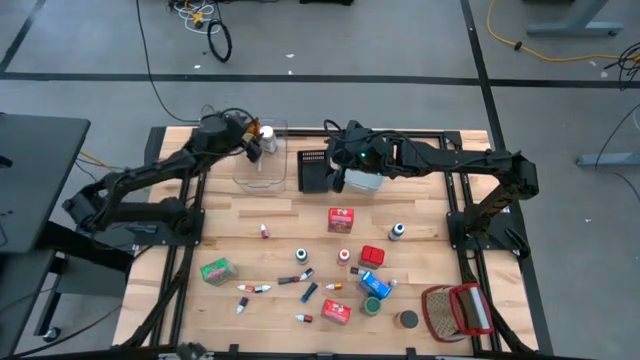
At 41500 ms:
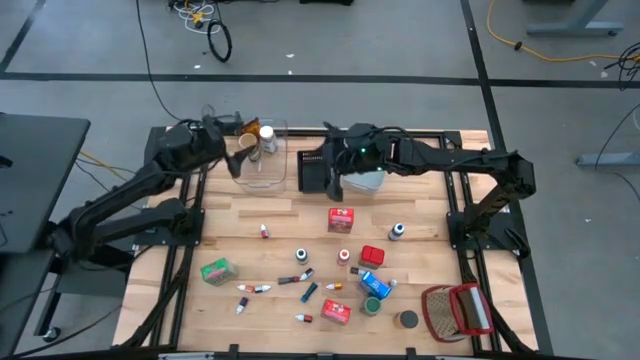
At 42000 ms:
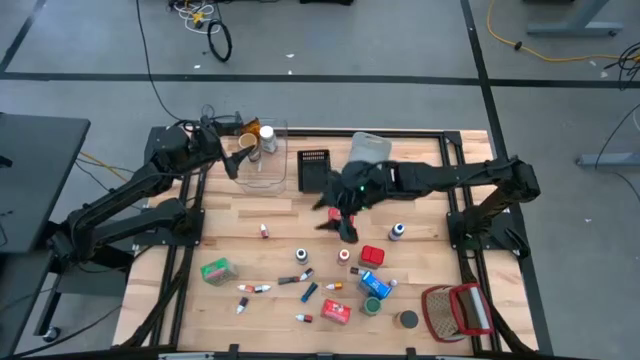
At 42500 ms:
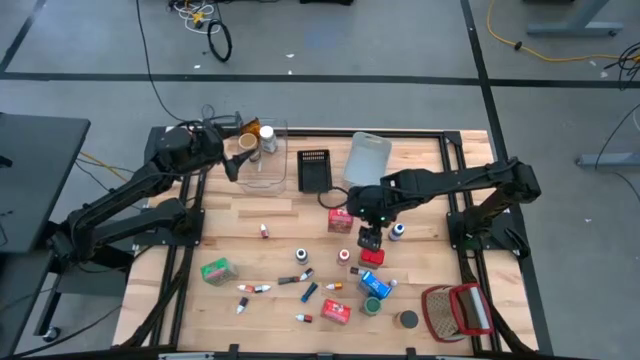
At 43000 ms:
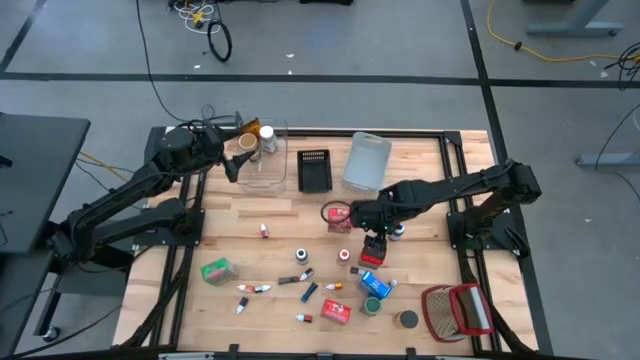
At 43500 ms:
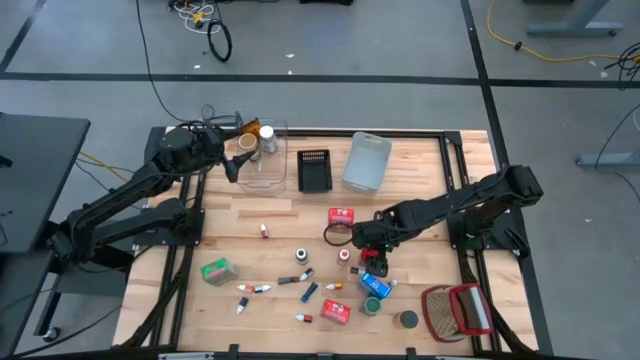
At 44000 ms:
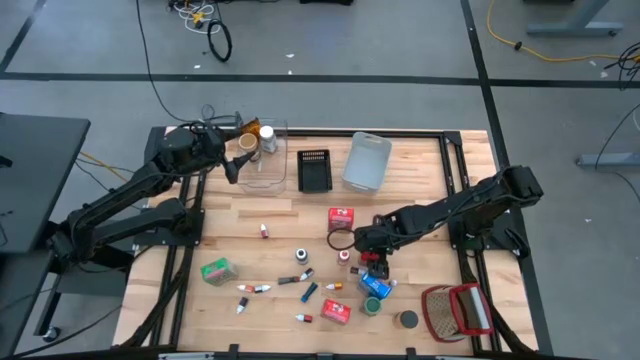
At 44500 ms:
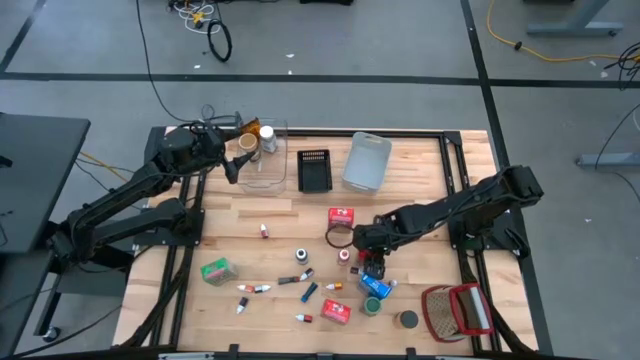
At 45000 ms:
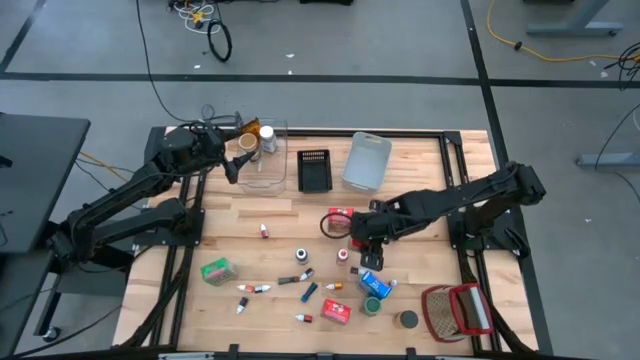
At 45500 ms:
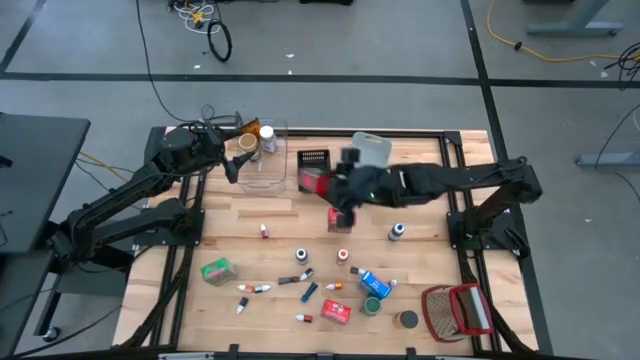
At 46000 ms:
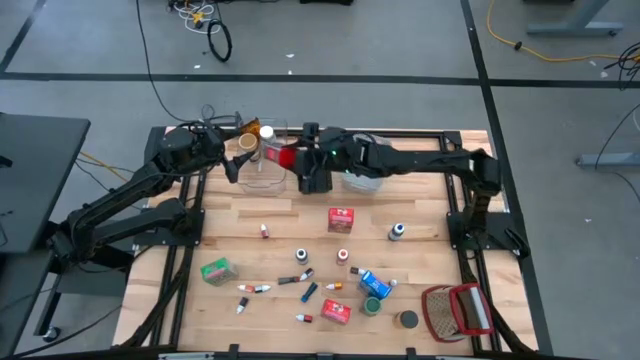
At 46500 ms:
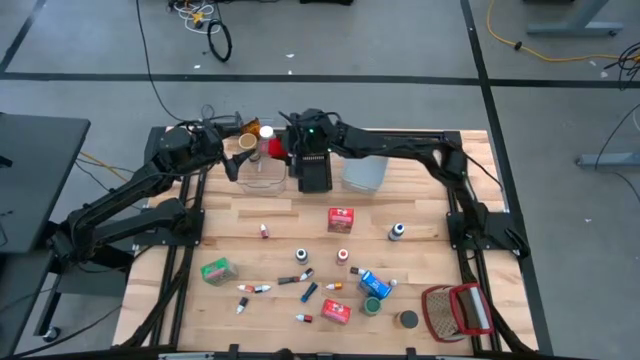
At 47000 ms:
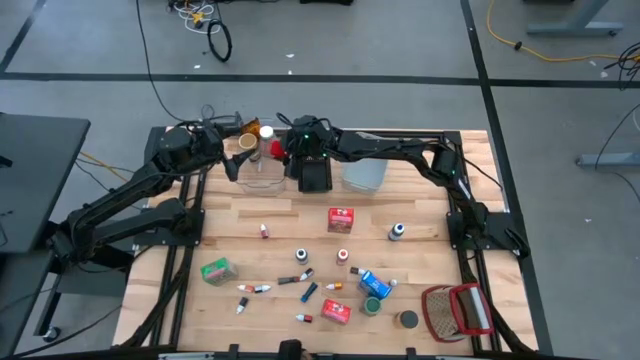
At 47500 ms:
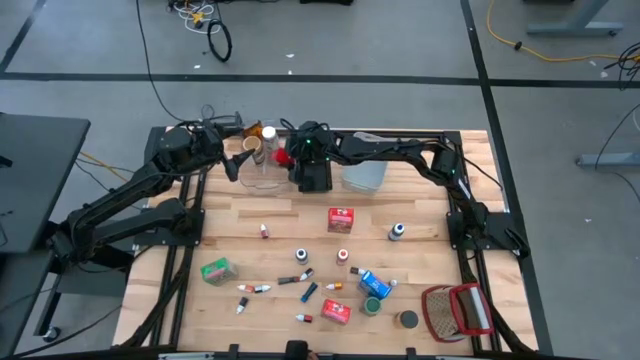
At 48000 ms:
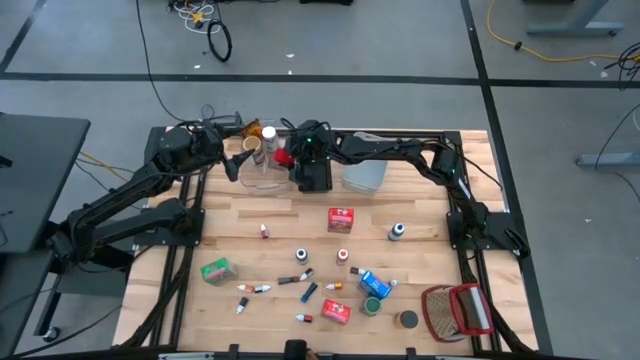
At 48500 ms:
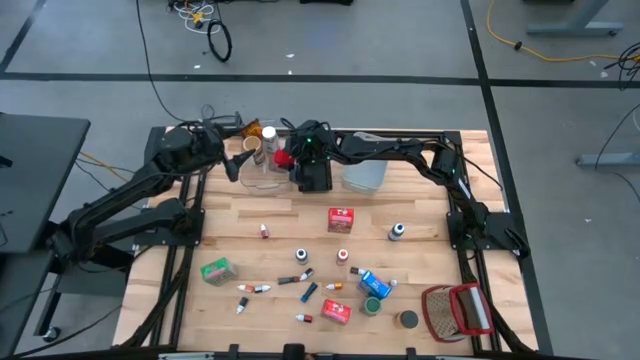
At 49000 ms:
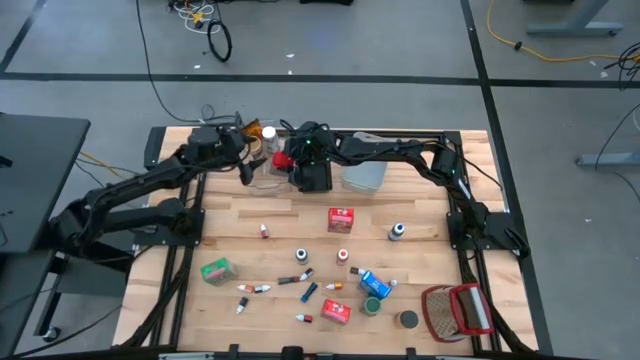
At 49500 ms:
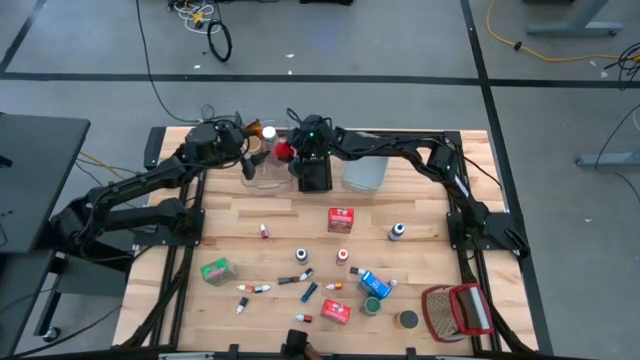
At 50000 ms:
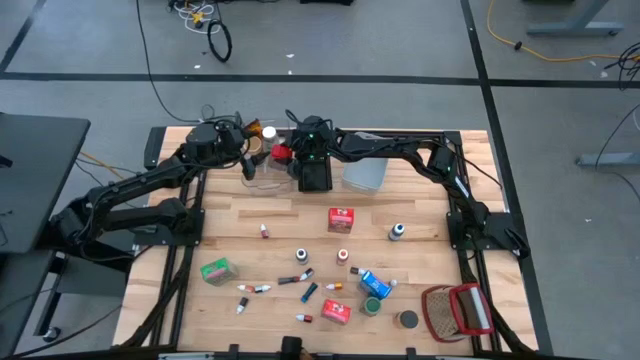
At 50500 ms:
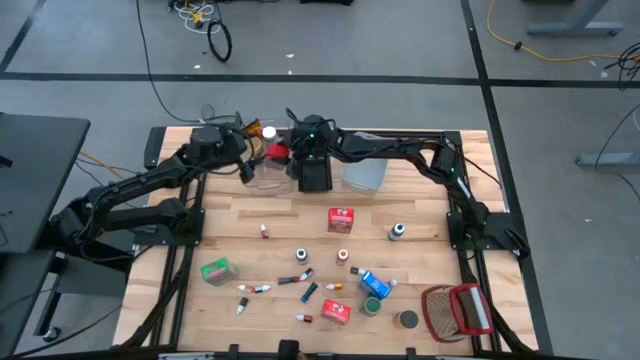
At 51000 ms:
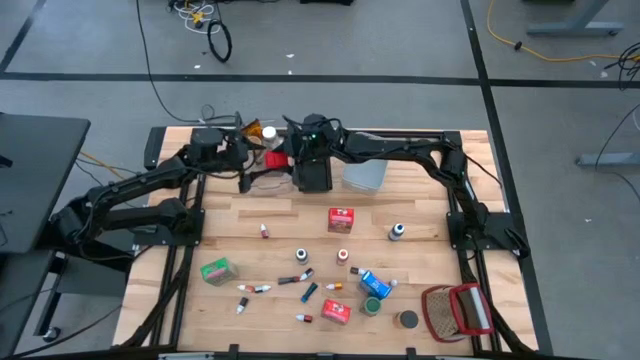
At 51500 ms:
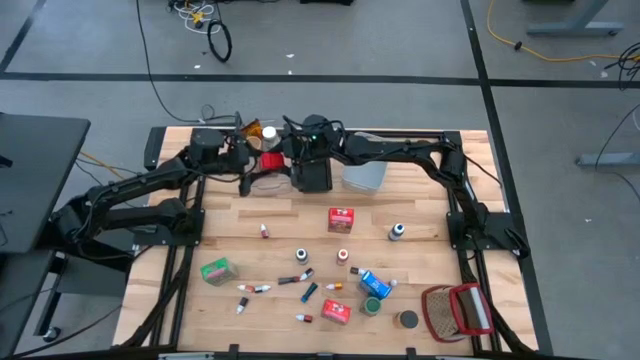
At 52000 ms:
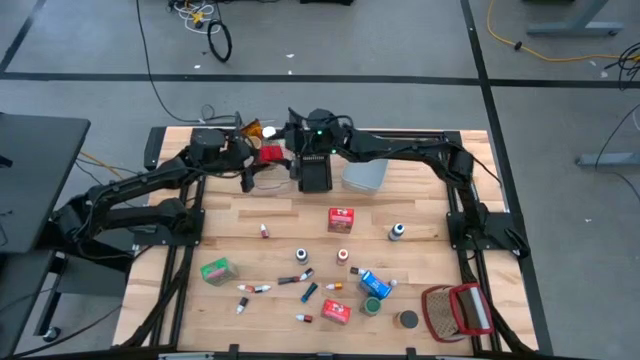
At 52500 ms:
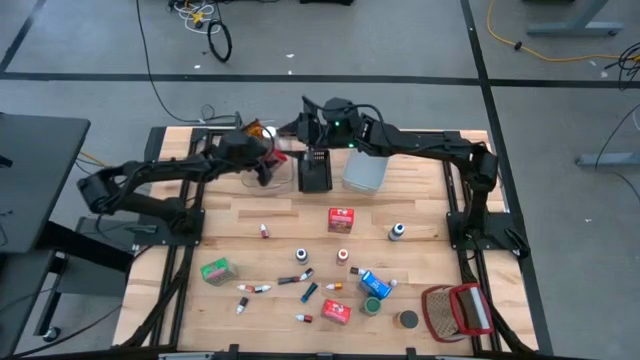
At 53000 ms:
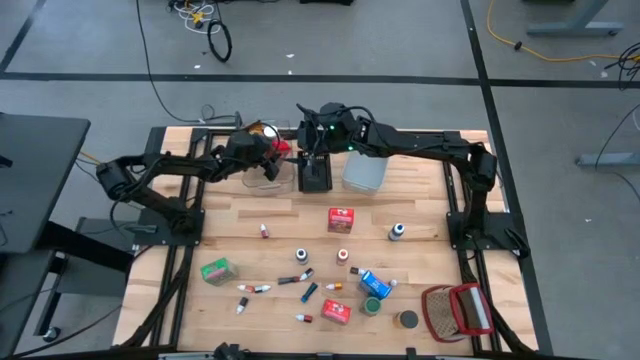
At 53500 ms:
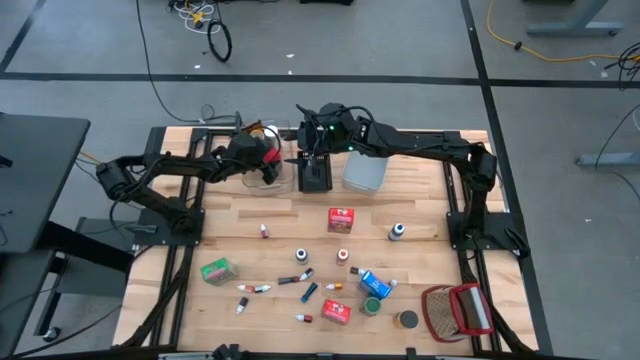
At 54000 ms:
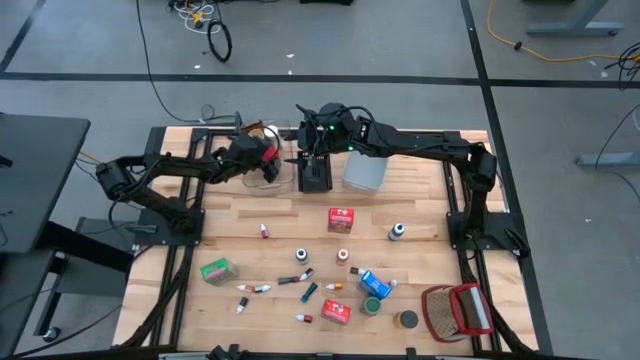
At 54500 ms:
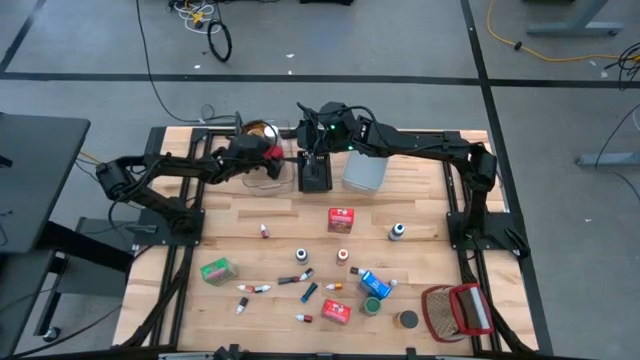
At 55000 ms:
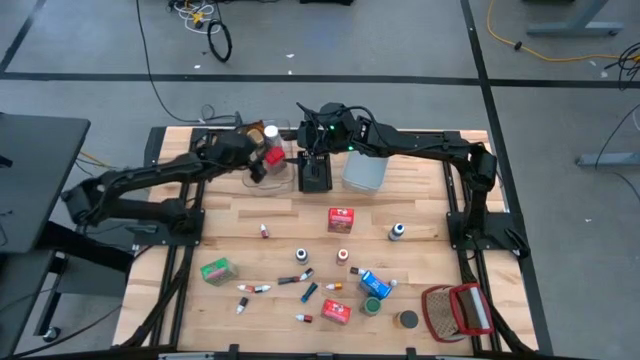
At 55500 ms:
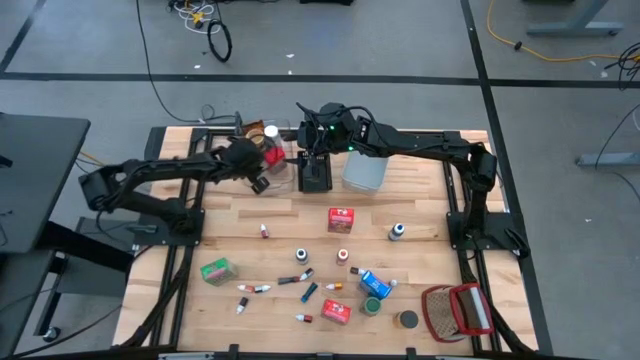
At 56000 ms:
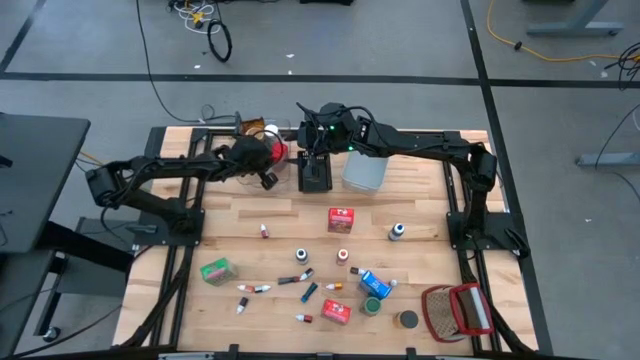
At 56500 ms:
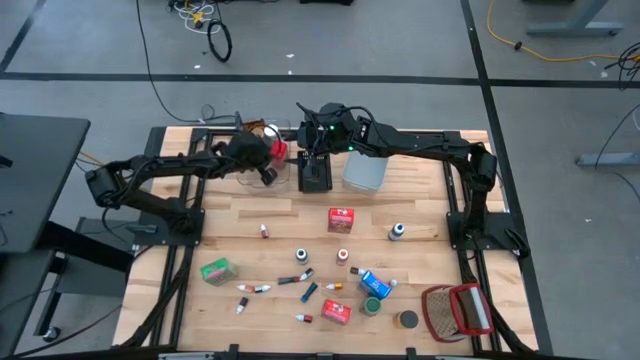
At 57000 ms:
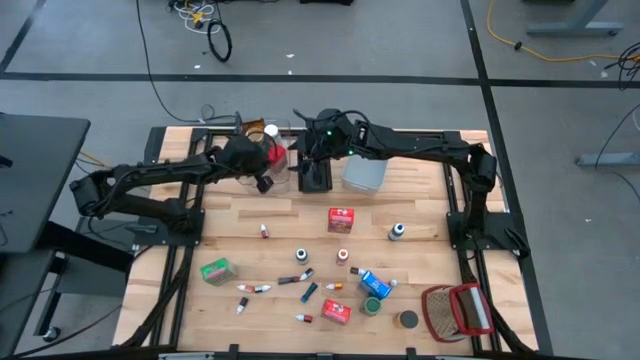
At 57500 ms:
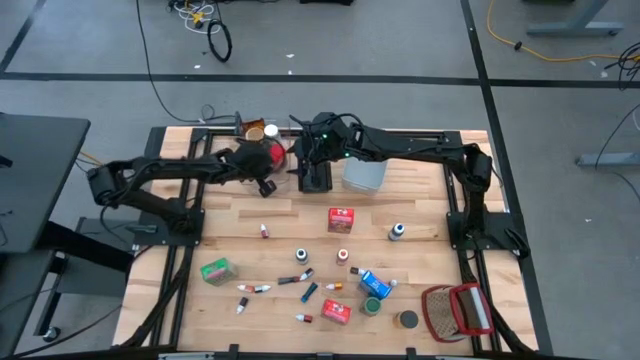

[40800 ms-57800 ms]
Task: Pick & Place Kitchen Items
Put the red seasoning can into the transparent bin

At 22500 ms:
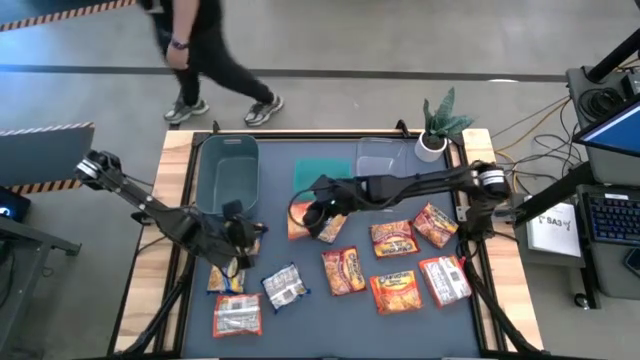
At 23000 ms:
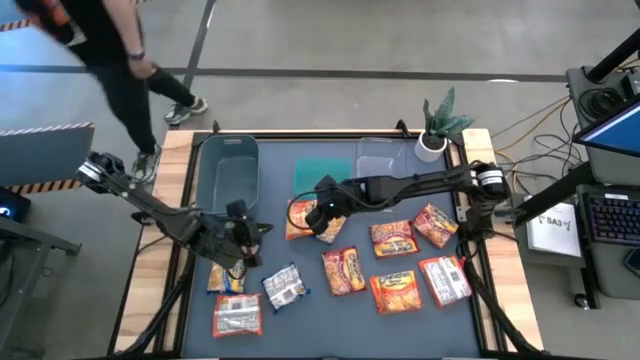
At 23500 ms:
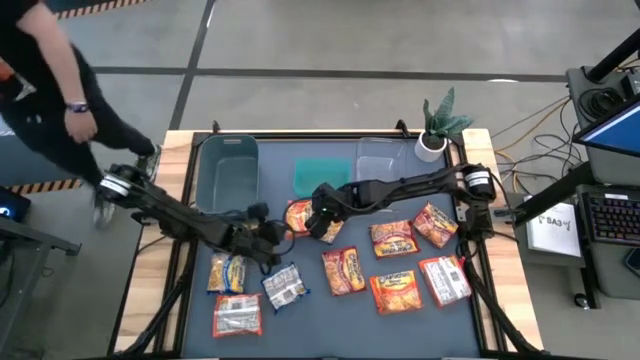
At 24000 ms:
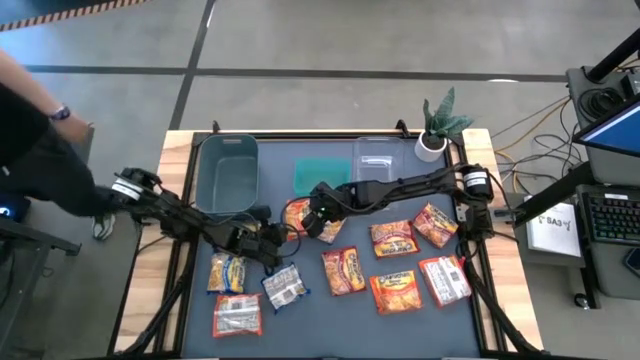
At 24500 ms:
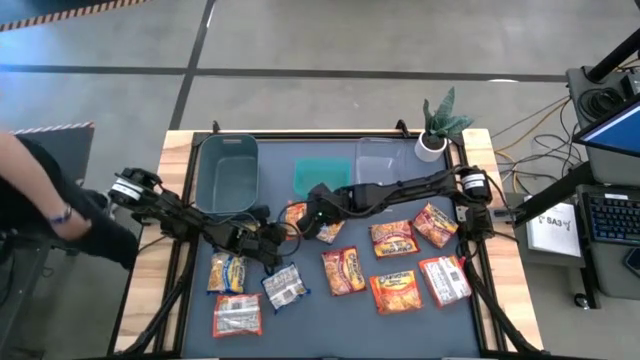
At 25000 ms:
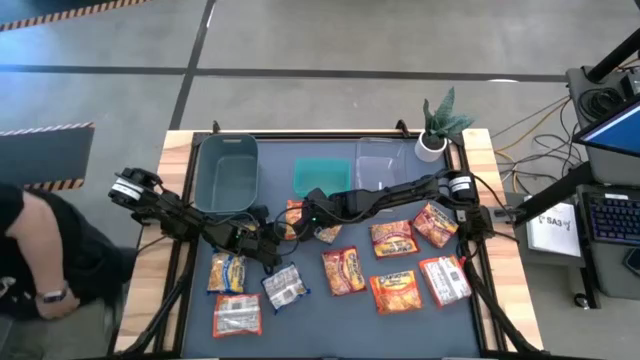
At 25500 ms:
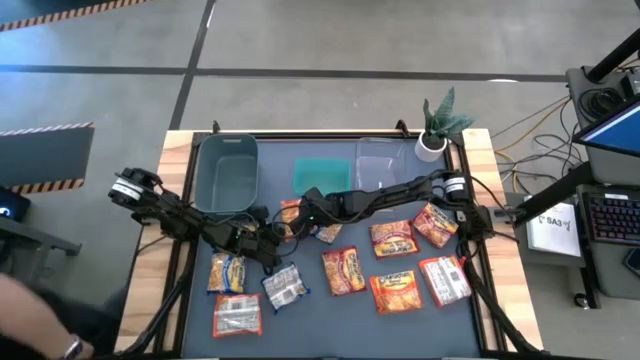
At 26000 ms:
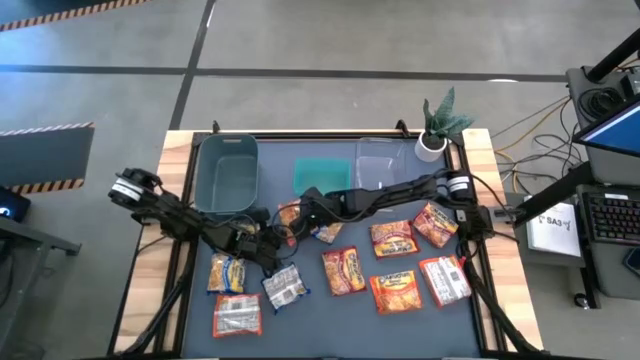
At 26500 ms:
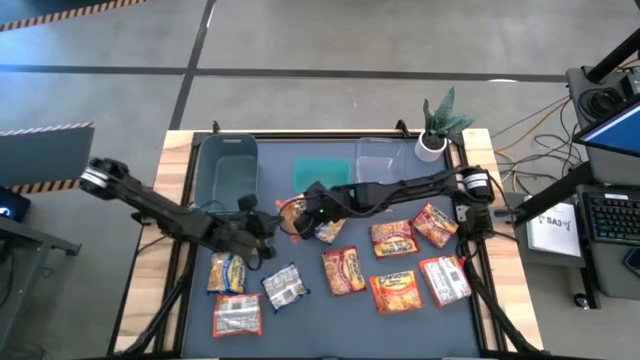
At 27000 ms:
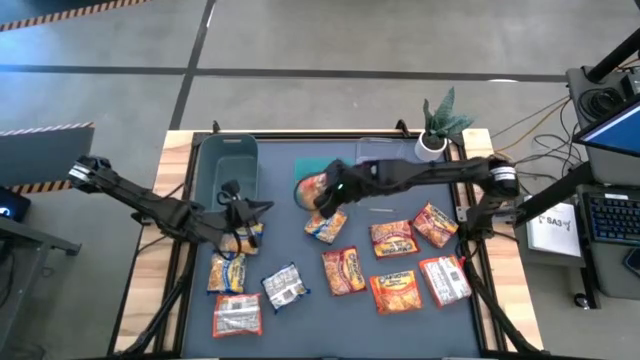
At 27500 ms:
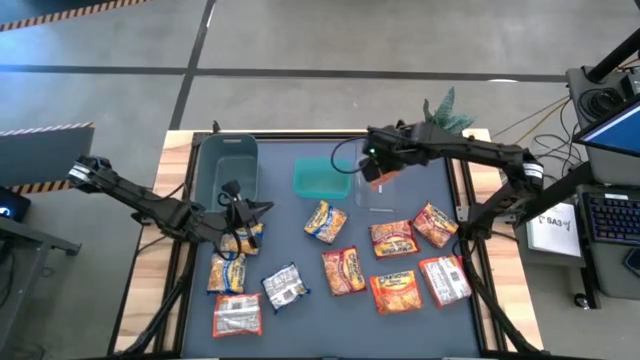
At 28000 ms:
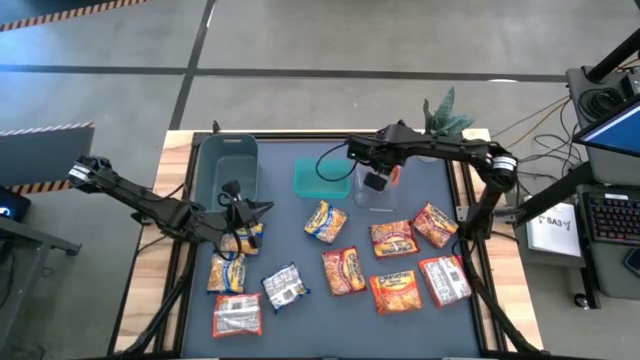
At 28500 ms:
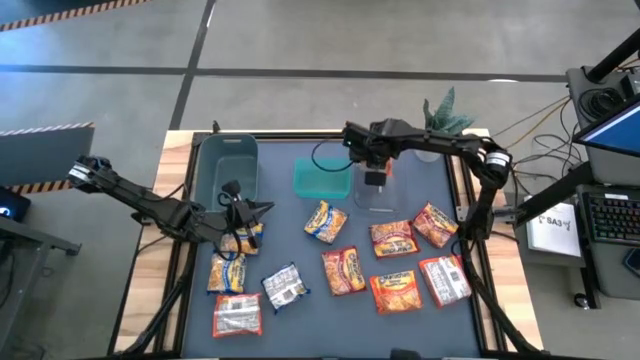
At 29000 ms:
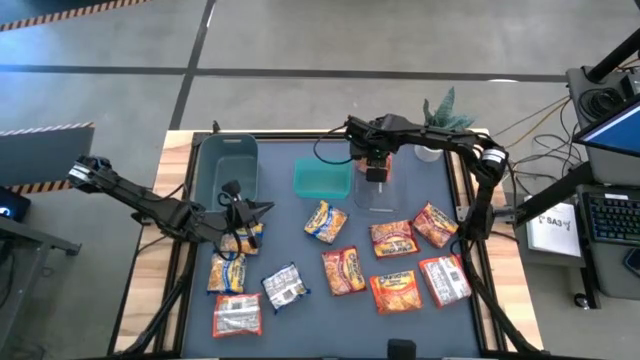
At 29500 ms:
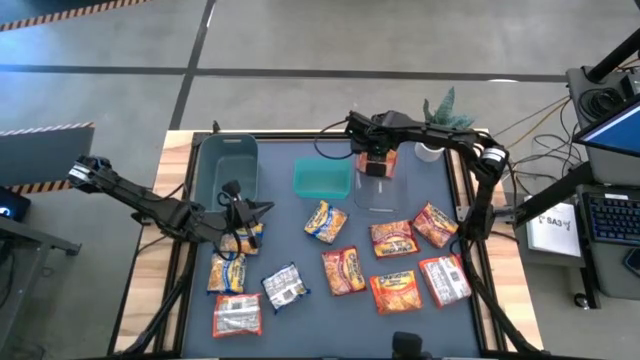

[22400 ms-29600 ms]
Task: Sort Maruchan noodles
Put the orange noodle pack into the transparent bin
